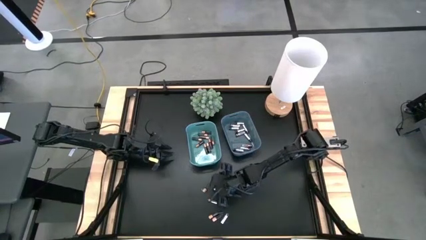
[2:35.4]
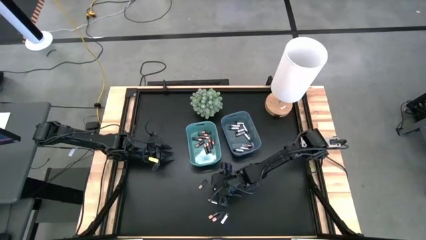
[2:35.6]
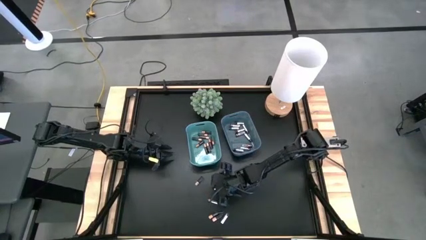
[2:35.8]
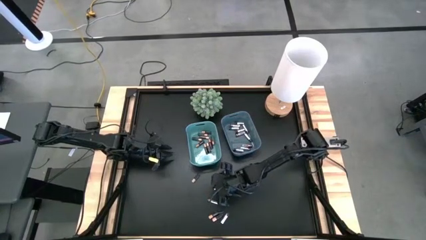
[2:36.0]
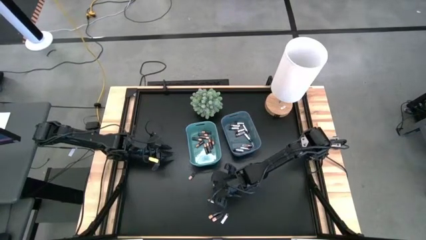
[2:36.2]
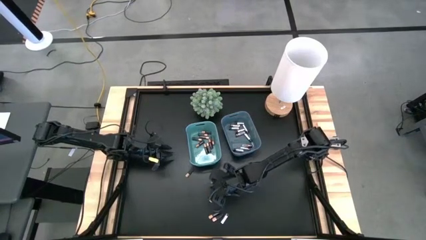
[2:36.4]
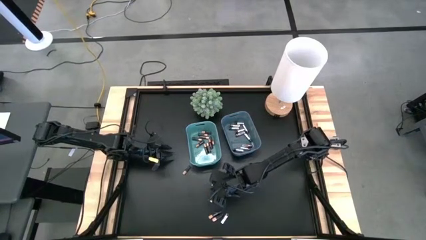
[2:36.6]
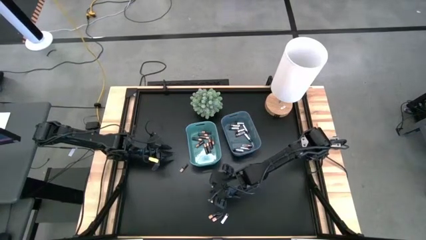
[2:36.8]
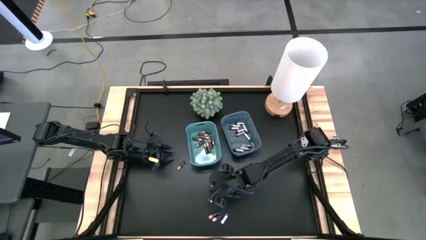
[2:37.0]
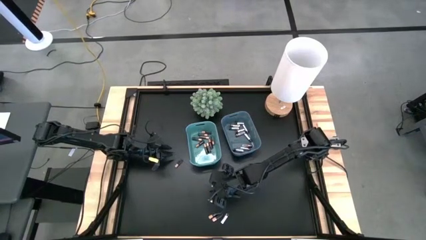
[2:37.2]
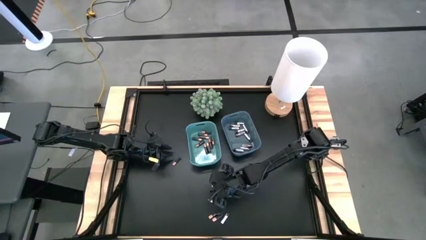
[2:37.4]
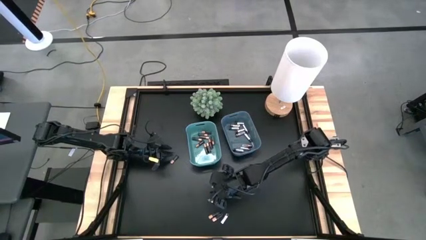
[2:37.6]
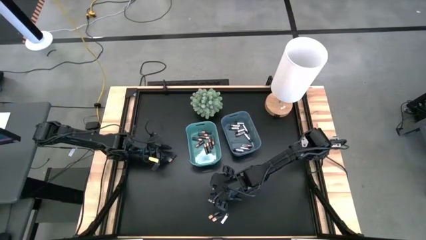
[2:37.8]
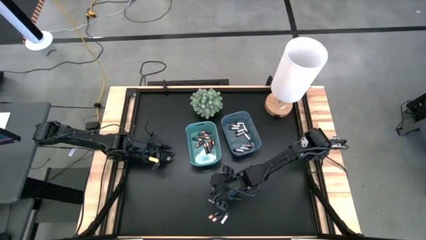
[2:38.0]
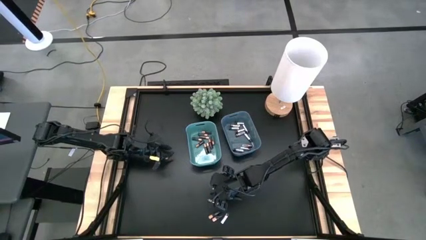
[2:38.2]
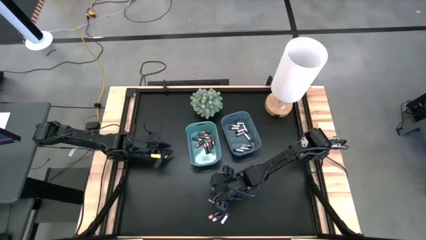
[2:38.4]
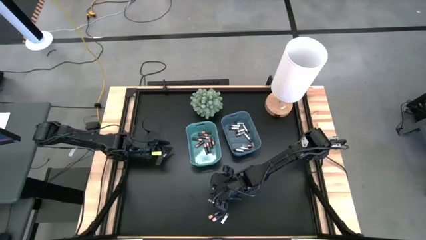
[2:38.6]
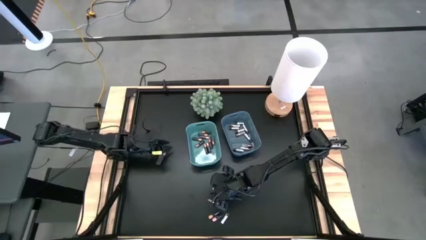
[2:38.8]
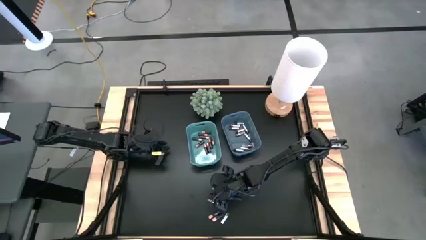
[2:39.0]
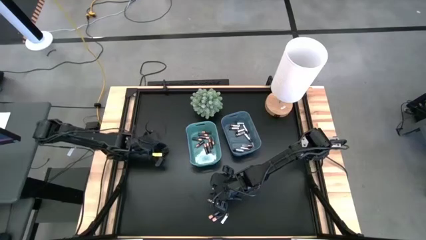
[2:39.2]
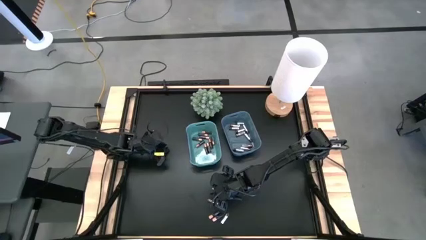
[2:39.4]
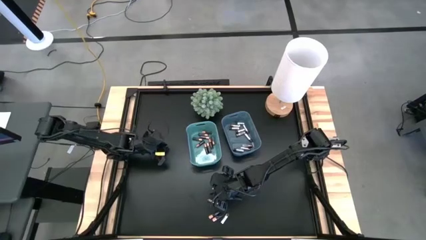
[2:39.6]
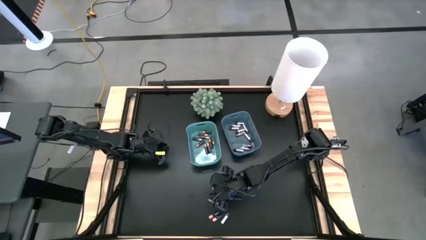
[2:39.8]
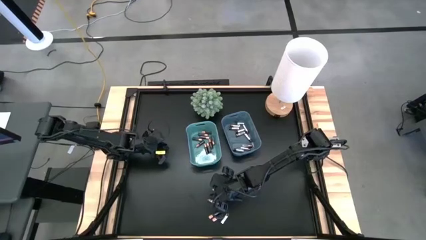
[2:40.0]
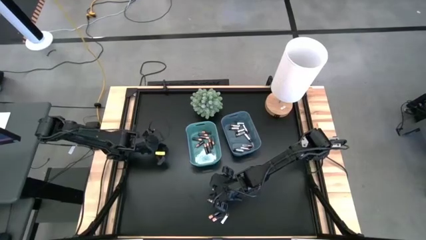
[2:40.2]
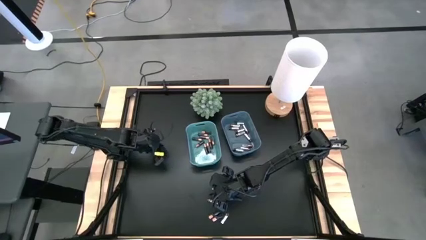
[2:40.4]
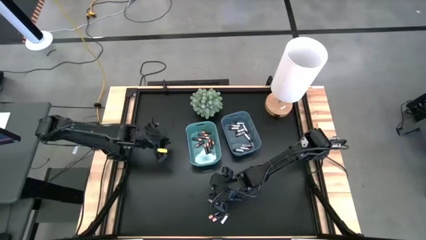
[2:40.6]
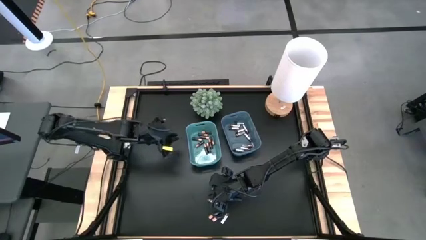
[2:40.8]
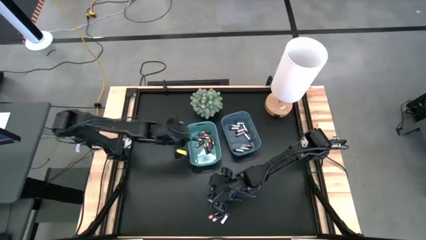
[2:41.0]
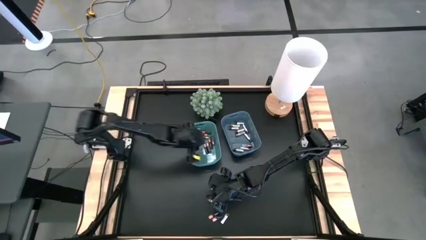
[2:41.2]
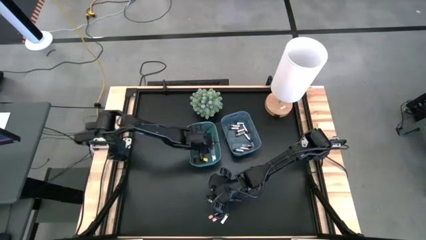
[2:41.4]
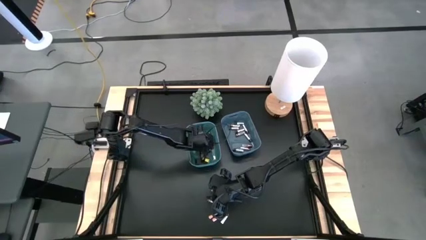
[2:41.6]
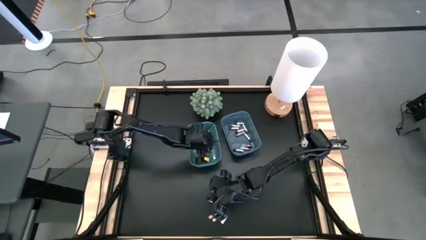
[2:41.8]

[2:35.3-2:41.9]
Task: Sort batteries
Put the black battery into the green bin

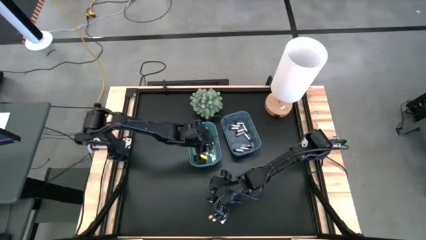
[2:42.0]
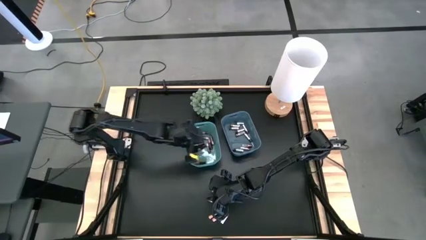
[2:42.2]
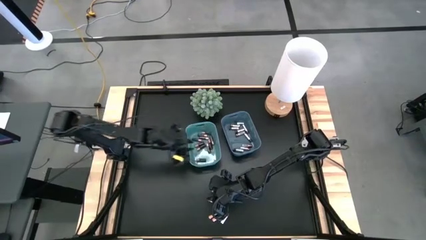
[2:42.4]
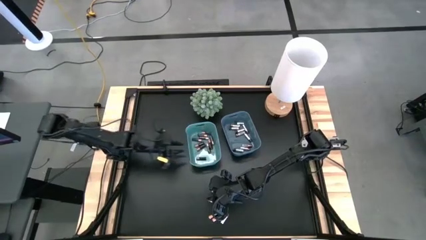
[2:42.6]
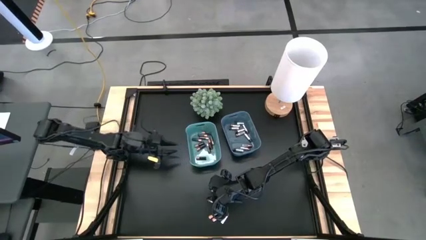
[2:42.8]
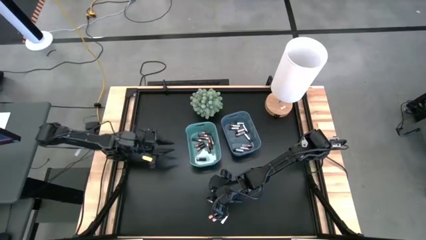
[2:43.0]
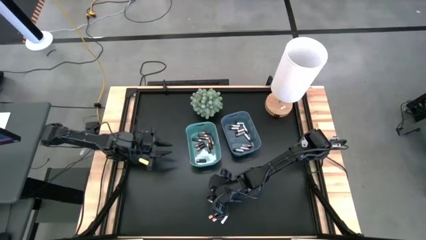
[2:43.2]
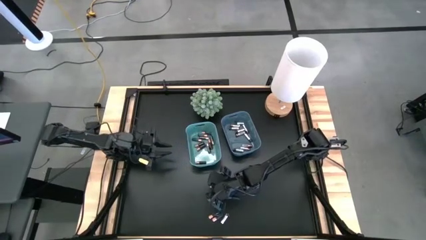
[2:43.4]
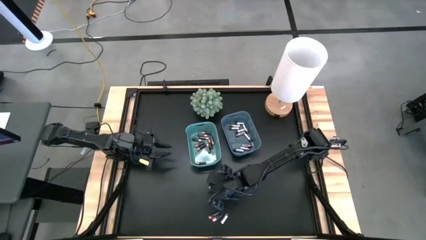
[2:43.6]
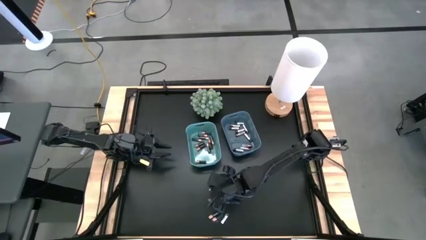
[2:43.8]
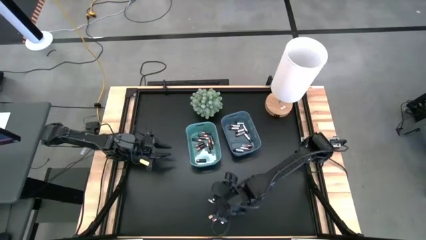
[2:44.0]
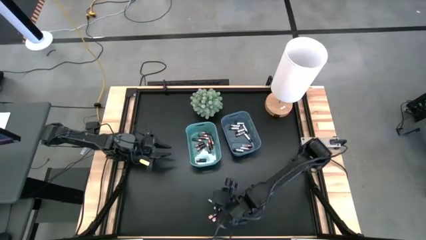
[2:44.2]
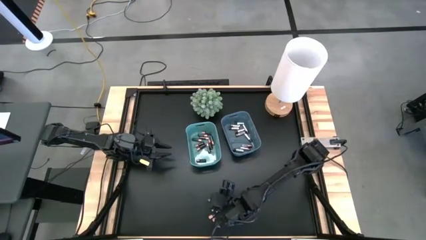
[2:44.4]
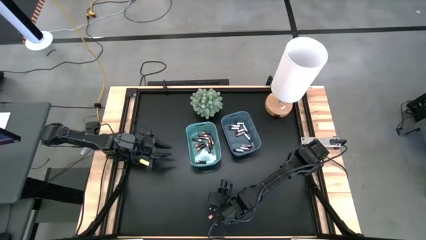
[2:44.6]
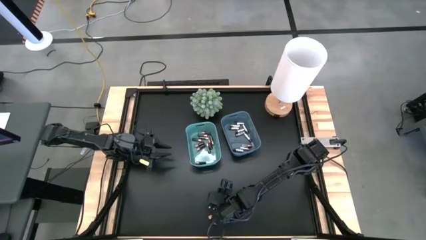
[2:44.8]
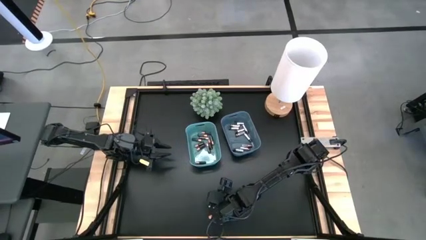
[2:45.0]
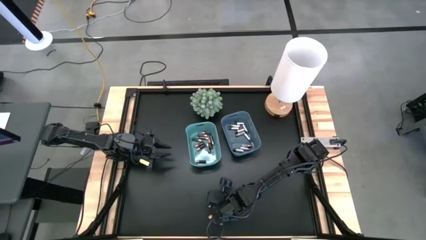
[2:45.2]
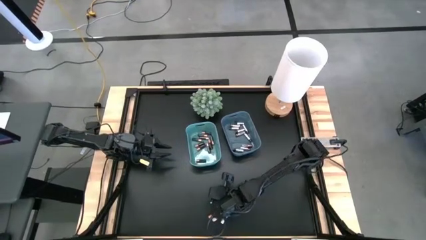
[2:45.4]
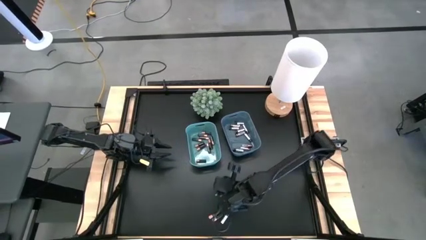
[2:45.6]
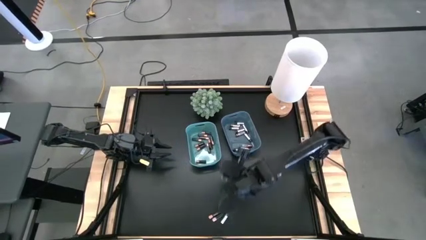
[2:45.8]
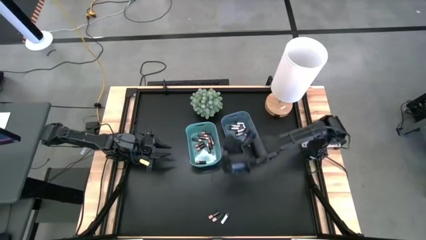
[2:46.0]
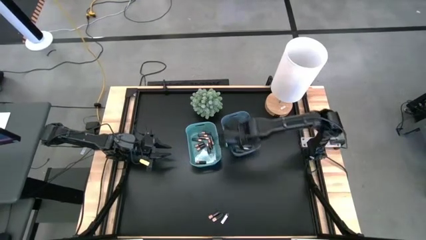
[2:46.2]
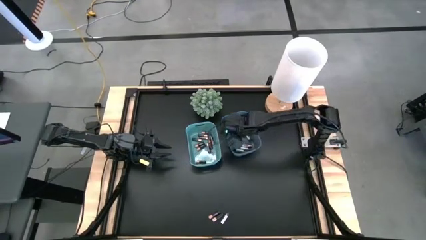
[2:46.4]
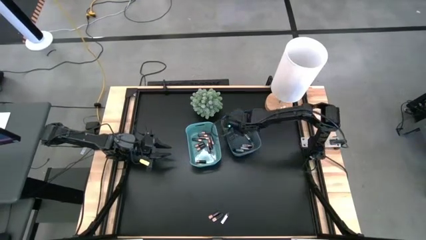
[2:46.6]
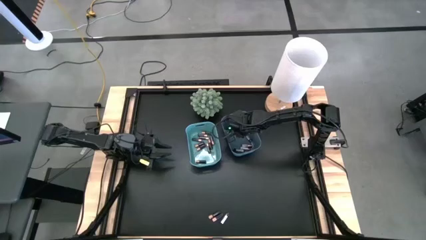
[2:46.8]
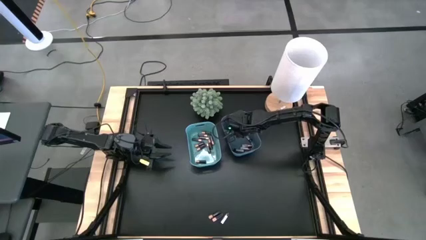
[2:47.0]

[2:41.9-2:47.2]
Put the white battery into the blue bin

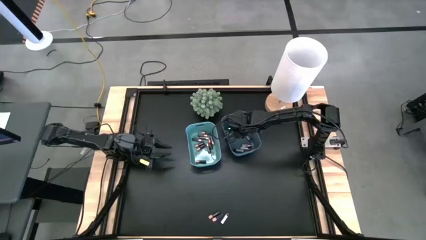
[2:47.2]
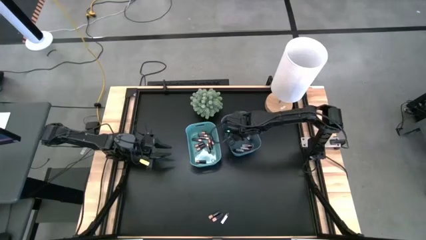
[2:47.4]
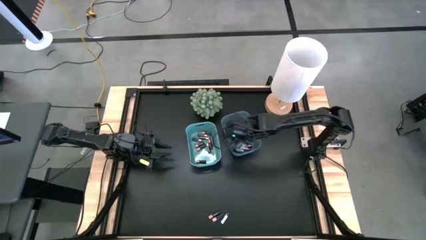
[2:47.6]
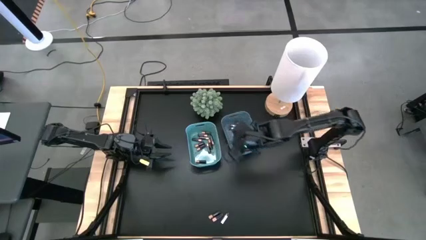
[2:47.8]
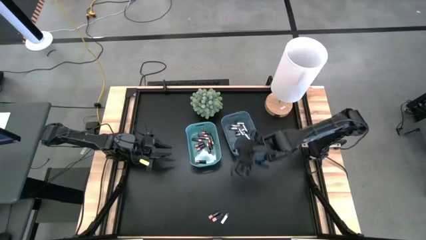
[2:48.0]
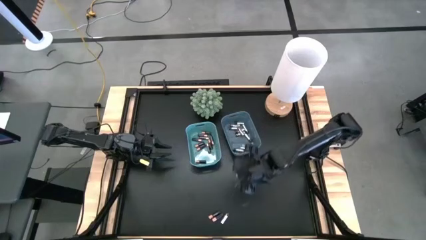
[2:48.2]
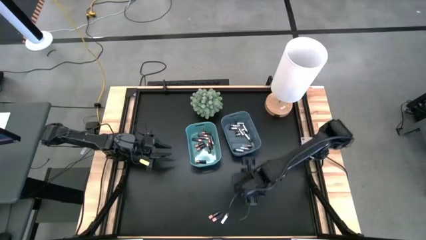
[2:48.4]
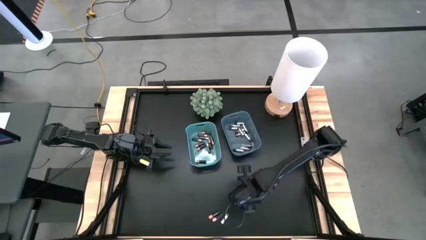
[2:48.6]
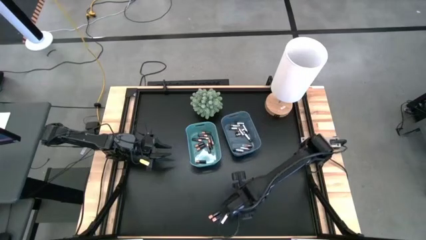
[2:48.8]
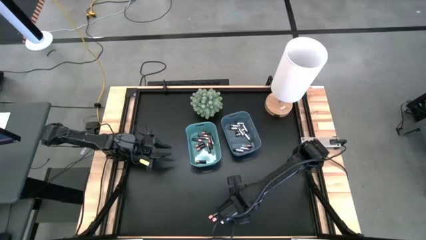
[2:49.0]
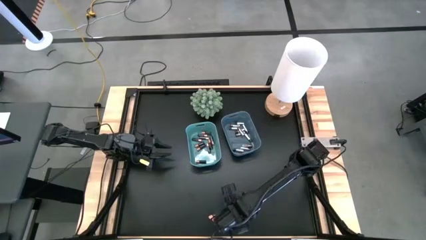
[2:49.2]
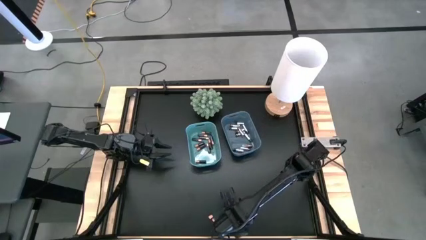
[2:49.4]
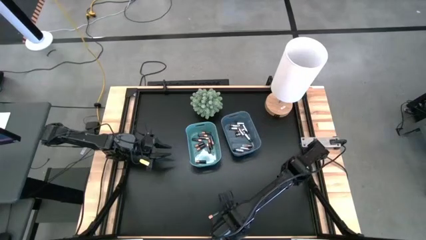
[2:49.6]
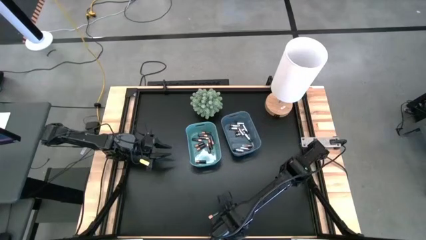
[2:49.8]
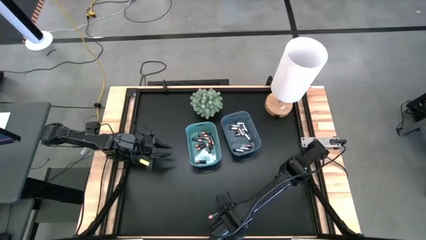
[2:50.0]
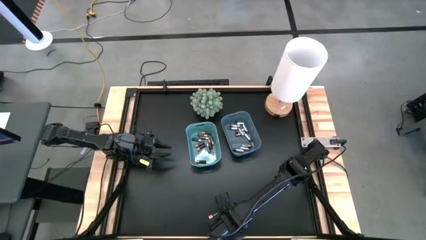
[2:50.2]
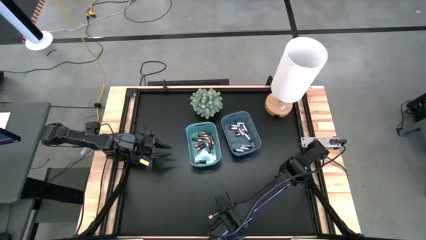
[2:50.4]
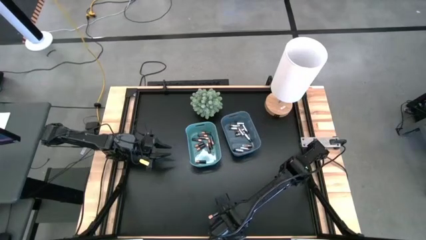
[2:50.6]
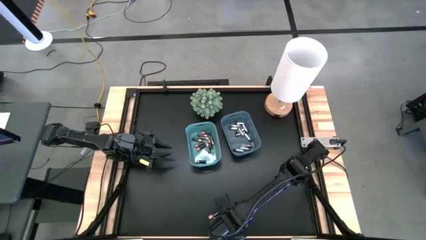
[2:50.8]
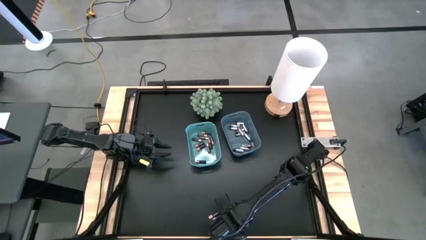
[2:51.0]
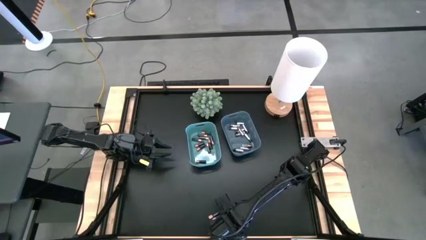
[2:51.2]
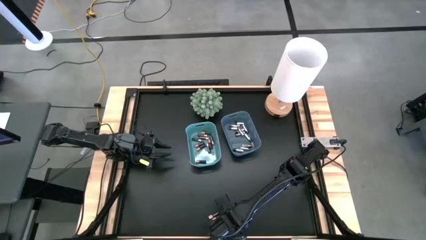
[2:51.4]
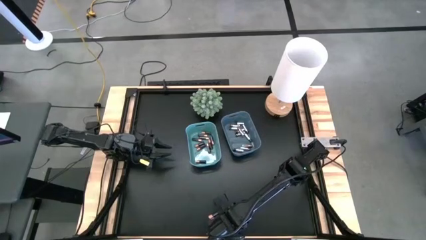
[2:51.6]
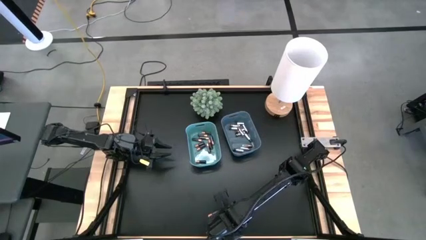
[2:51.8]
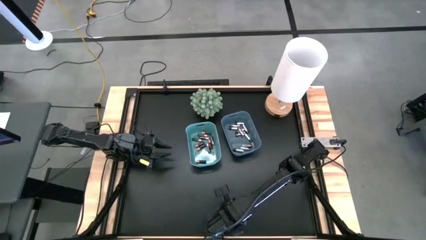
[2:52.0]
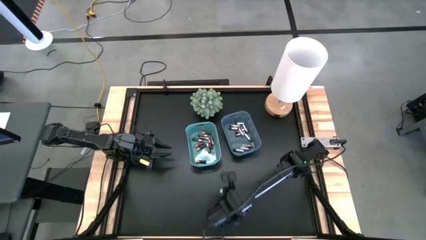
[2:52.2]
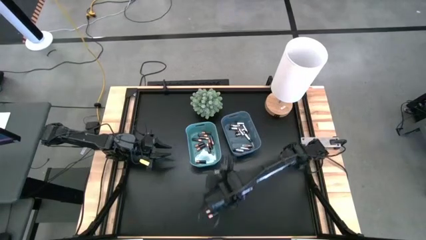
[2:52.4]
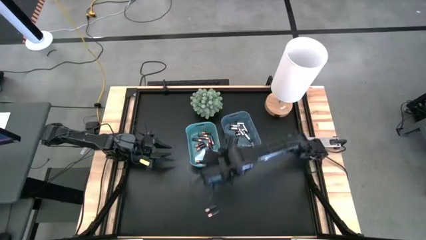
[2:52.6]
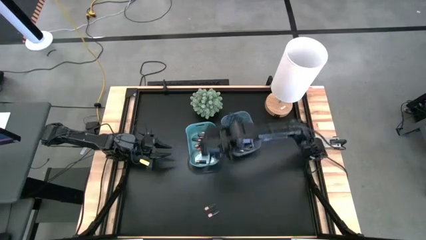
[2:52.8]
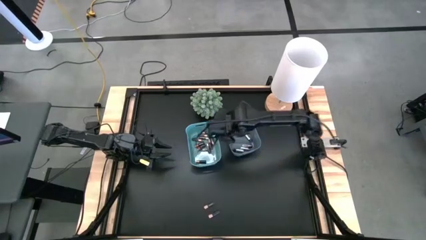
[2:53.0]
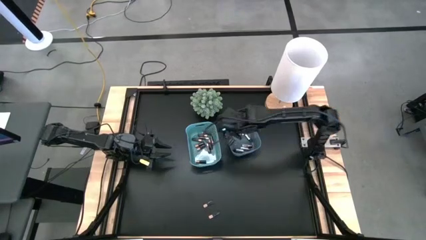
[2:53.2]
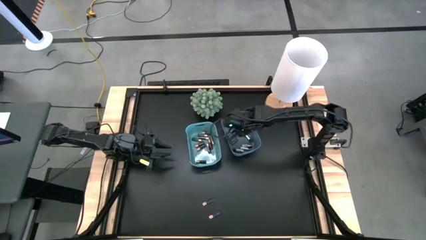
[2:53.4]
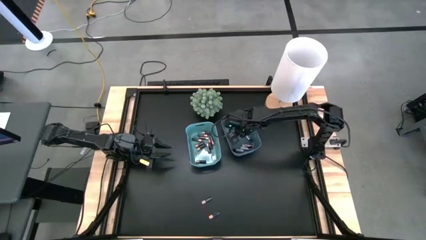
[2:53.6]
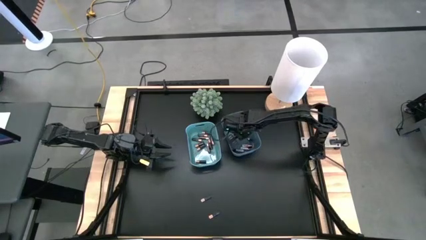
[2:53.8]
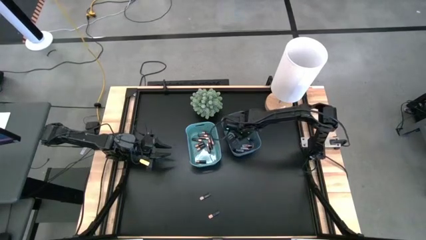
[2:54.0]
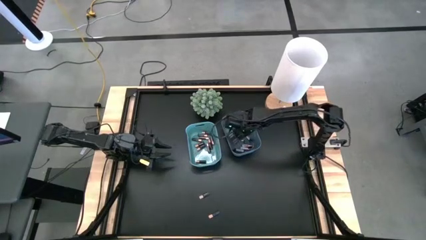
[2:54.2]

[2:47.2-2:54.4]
Put the white battery into the blue bin
